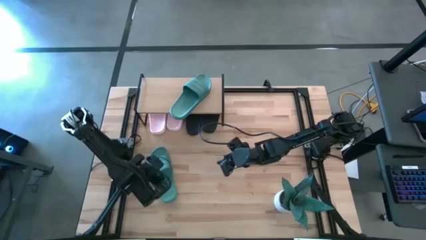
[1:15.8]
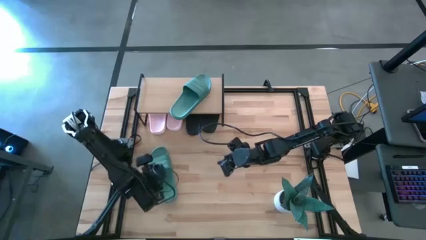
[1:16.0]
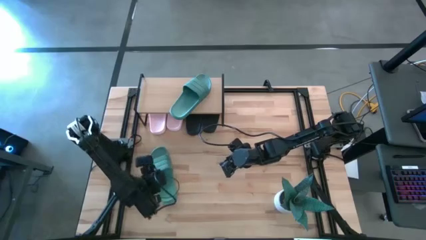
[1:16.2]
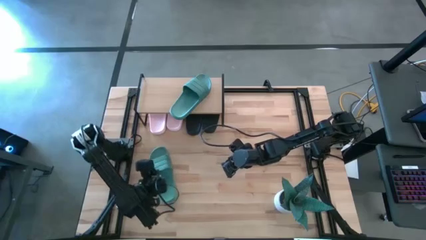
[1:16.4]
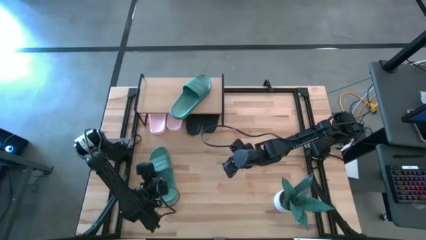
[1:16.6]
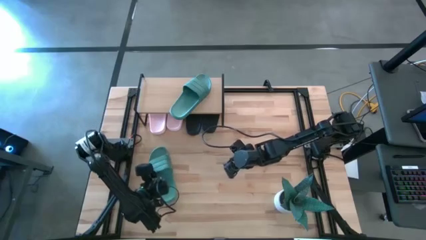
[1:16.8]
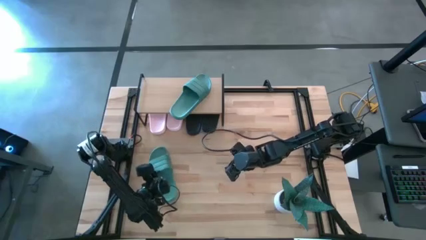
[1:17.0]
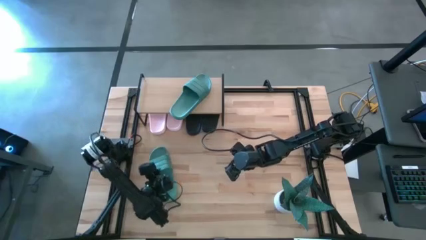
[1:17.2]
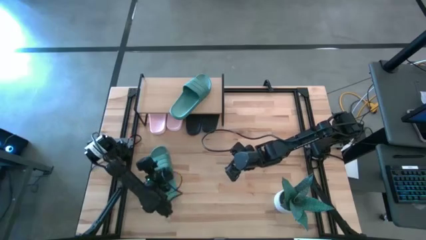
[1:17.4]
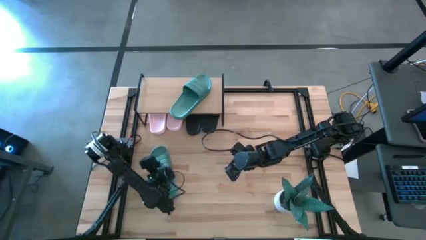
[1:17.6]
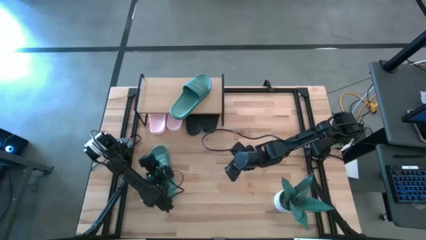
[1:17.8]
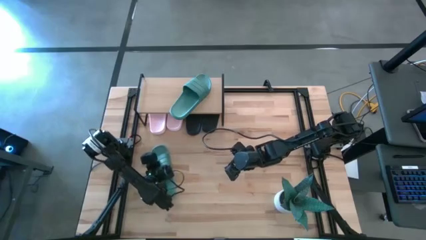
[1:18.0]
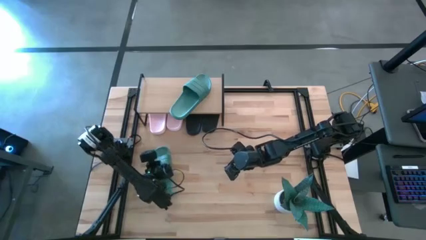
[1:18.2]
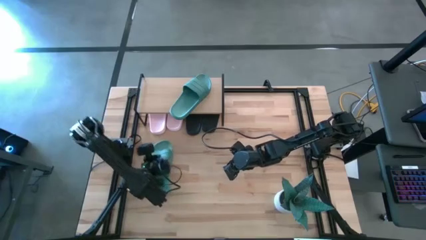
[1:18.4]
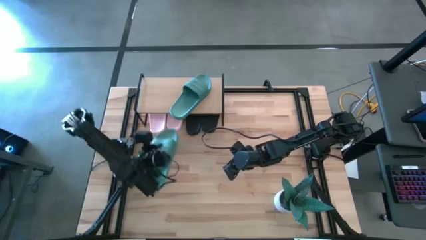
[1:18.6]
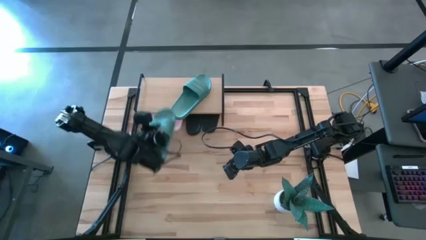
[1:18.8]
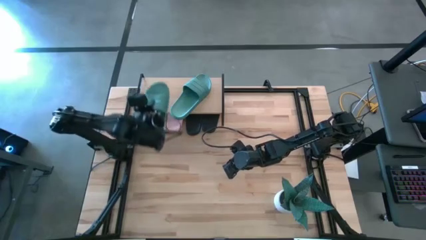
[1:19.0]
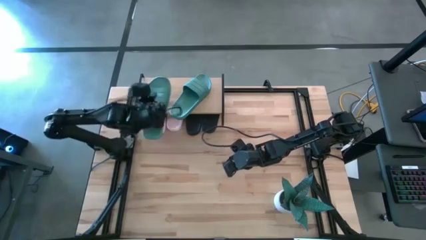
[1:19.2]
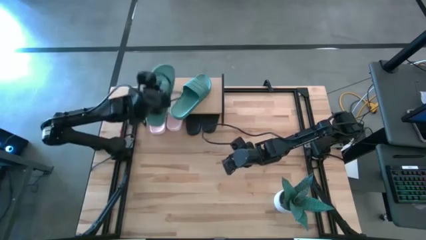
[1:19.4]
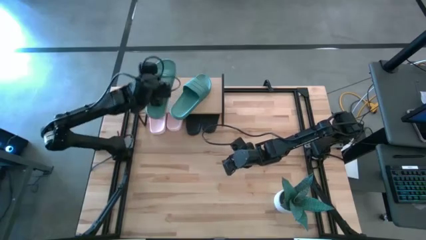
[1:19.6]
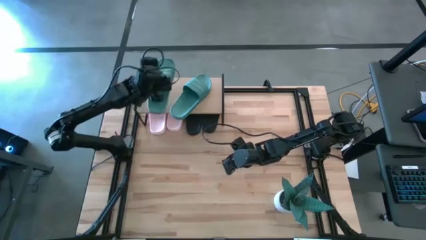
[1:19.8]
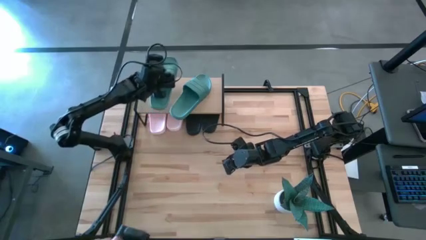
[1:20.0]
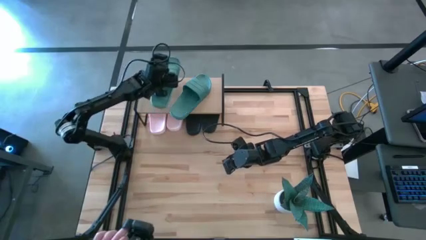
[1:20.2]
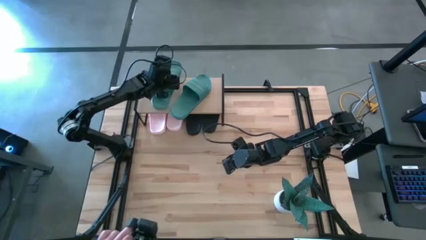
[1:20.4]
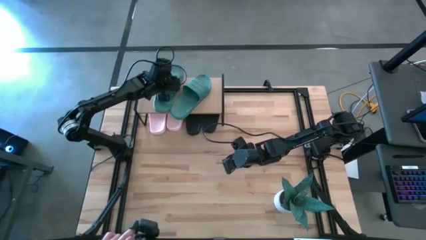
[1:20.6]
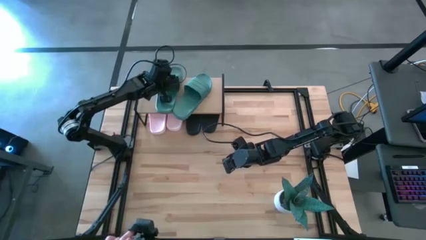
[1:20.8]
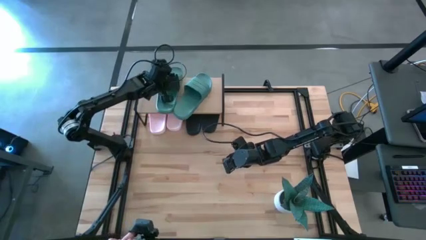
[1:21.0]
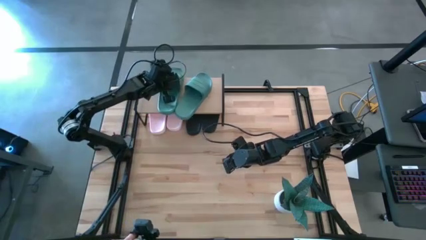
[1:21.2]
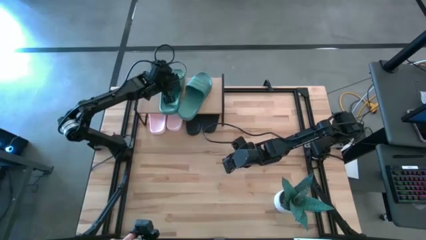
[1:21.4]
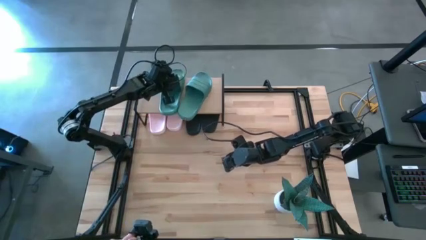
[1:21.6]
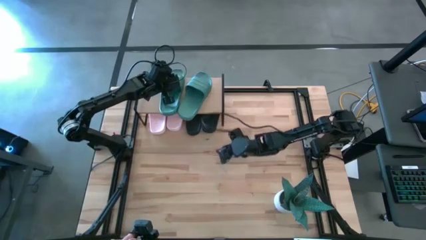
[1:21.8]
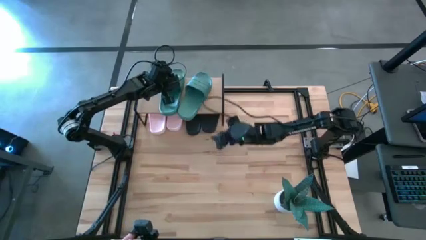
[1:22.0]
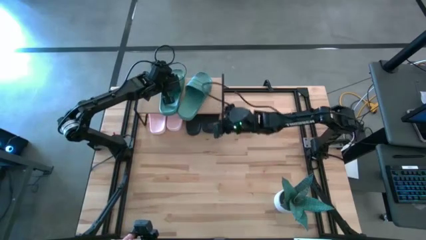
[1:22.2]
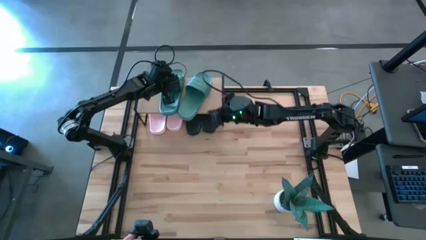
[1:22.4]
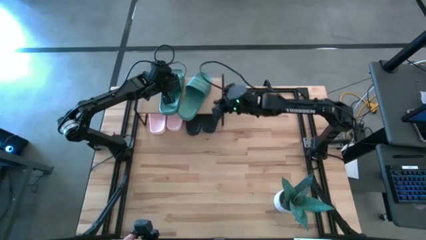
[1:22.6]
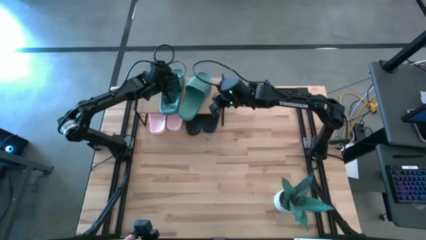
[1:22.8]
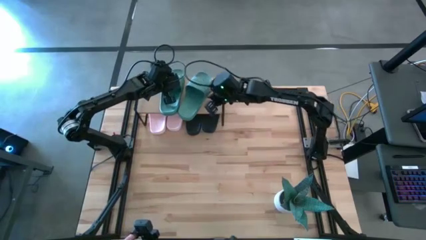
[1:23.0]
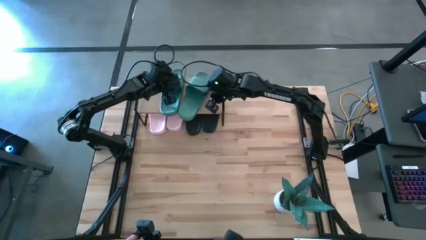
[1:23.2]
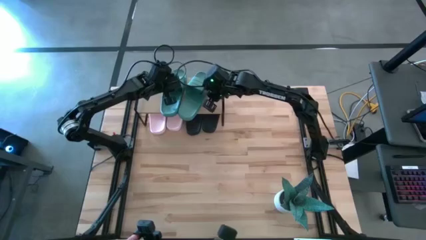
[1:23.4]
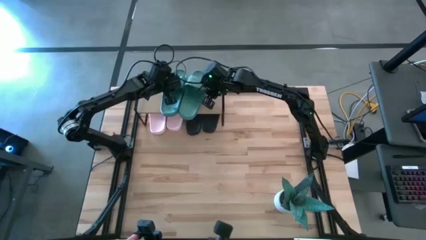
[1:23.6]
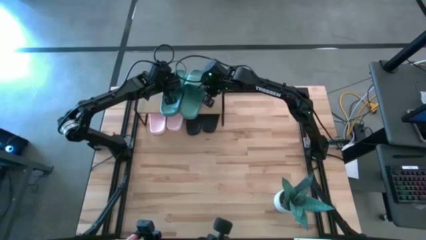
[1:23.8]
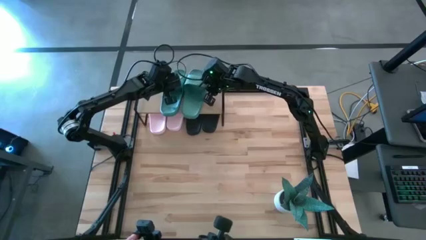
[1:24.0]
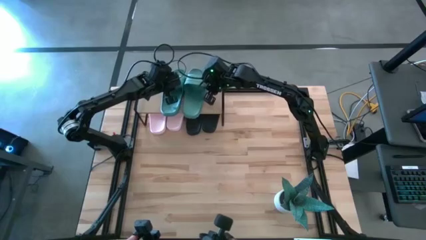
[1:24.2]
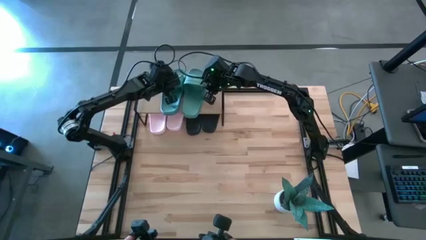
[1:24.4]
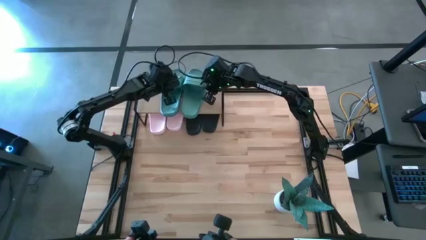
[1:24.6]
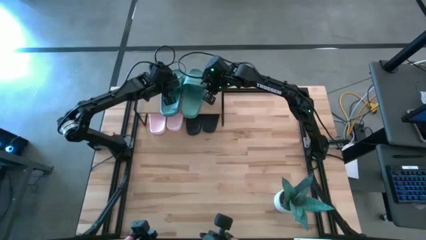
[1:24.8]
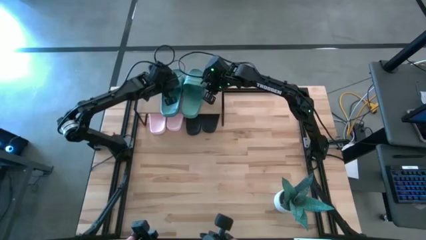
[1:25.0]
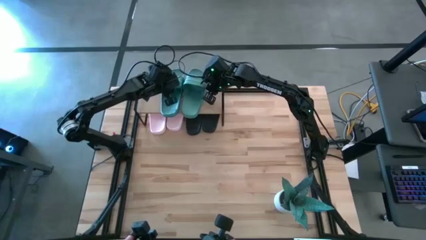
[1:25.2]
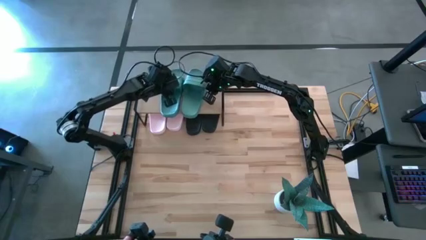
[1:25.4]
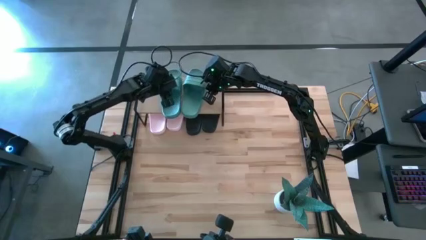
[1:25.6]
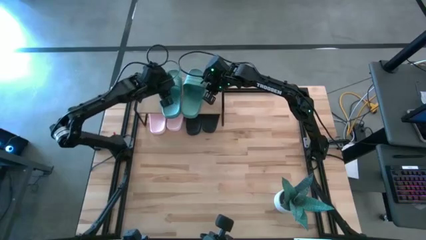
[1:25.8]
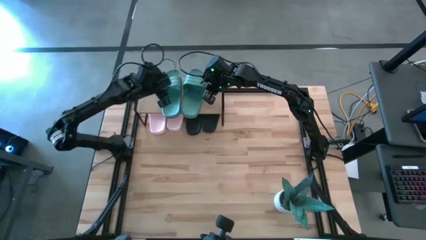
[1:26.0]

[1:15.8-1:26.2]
Task: Pick and place slides into the shelf
Put the green slide on the shelf

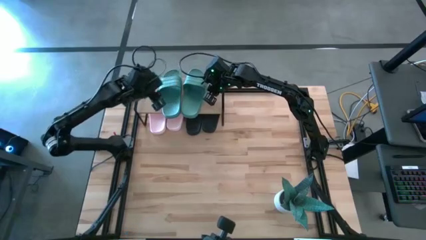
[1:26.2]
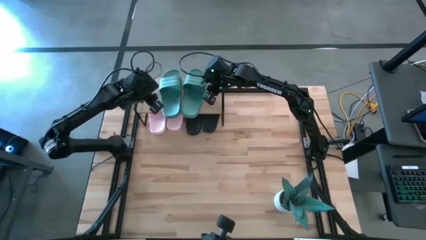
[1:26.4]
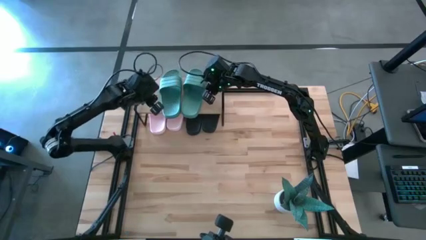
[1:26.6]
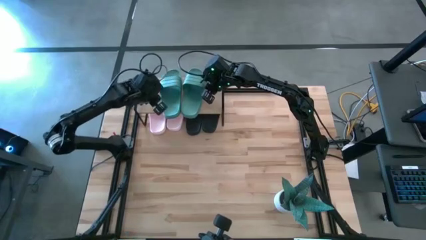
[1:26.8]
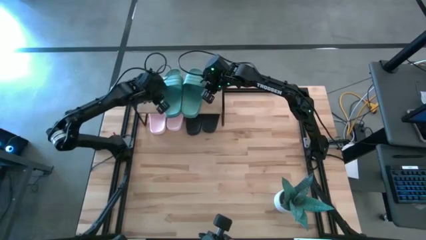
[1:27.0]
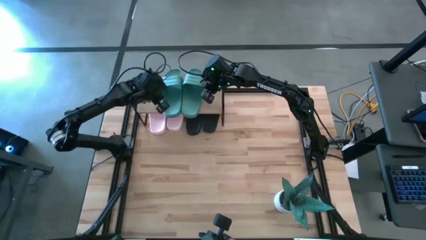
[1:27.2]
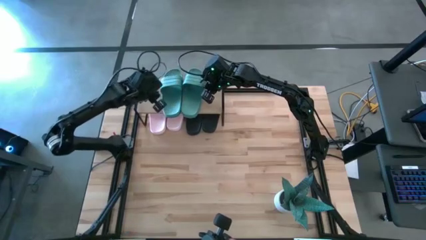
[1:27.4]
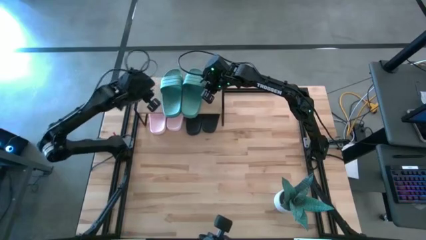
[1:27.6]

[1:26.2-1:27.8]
Adjust the green slides on the shelf

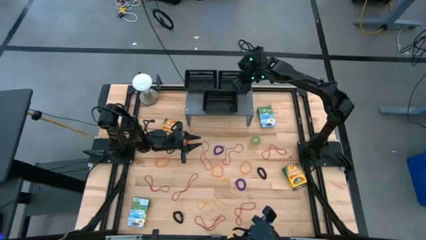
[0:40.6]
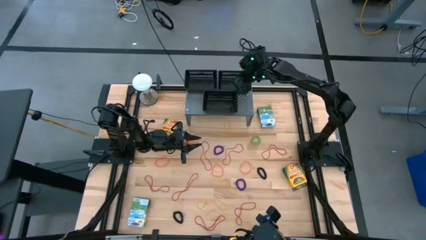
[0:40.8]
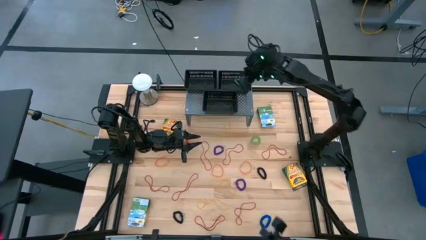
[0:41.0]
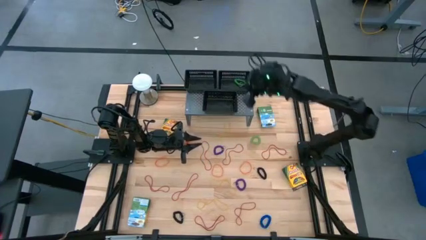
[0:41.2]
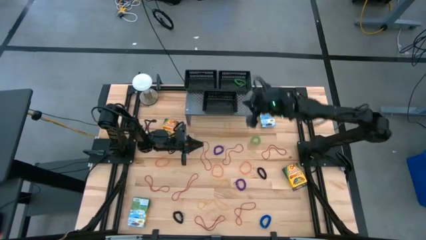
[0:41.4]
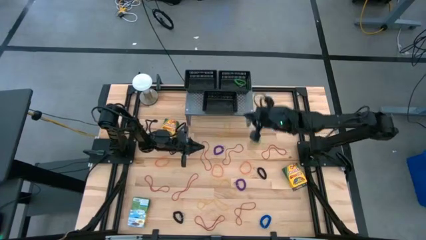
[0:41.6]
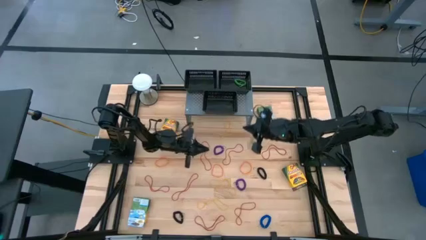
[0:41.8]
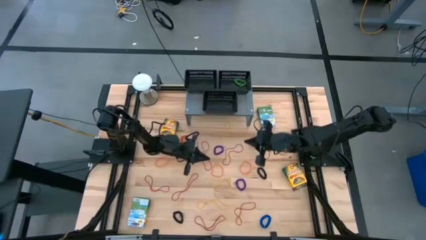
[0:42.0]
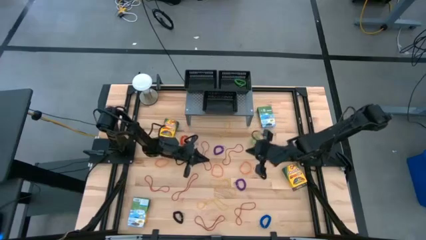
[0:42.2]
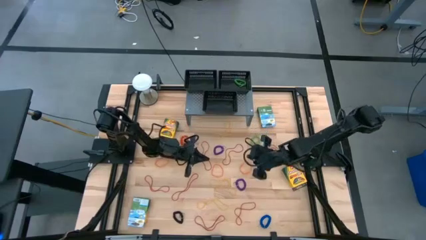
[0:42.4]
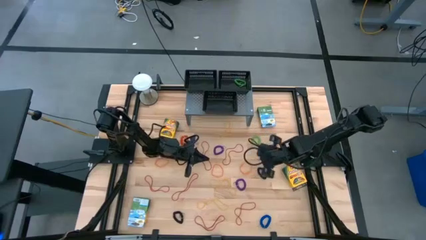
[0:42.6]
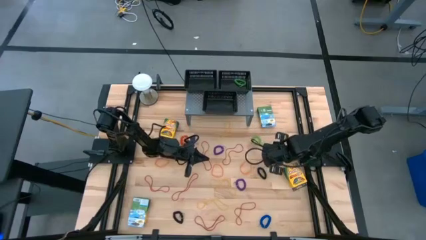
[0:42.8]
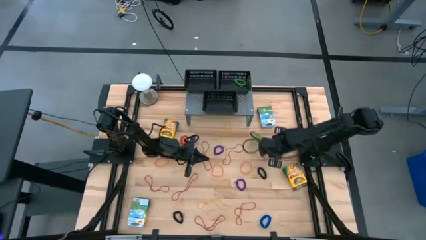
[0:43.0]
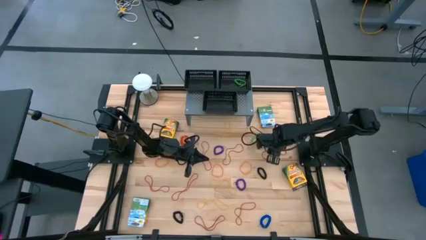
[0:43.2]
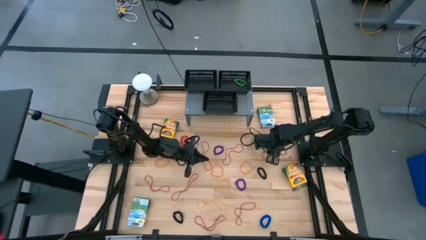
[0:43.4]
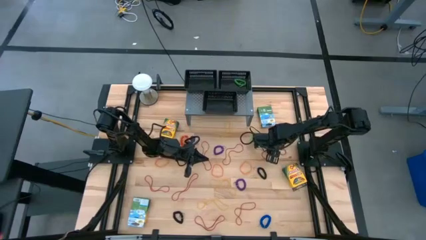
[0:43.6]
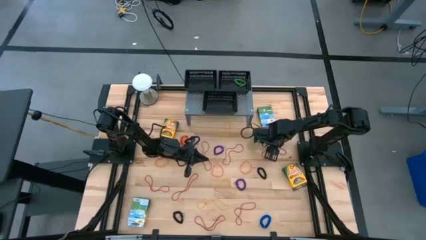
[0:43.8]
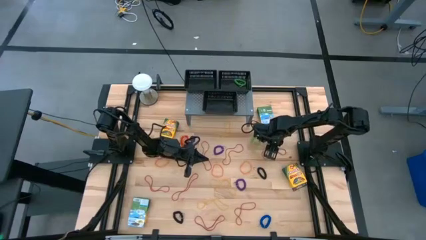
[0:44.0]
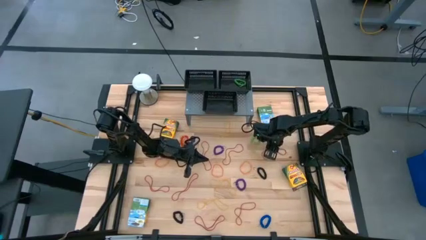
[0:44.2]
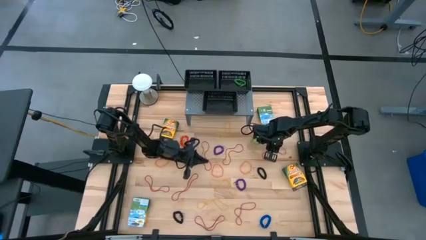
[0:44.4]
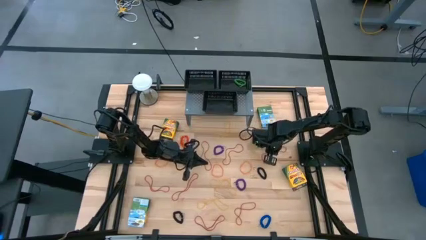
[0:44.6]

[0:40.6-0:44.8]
Task: Pick & Place Office Desk Supplies
Put the red rubber band into the top left black basket on the shelf
